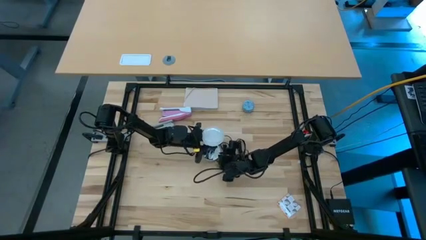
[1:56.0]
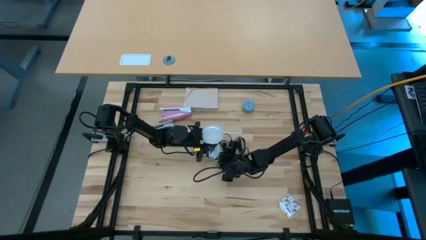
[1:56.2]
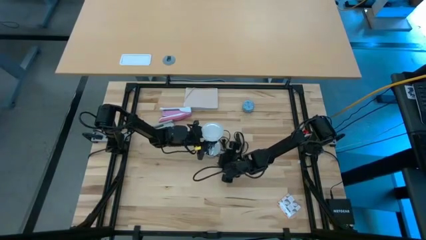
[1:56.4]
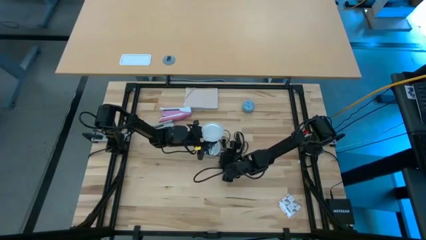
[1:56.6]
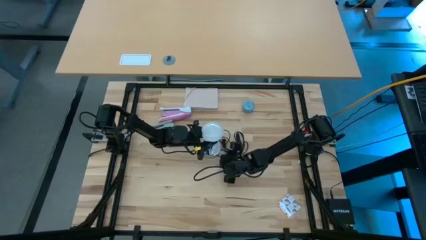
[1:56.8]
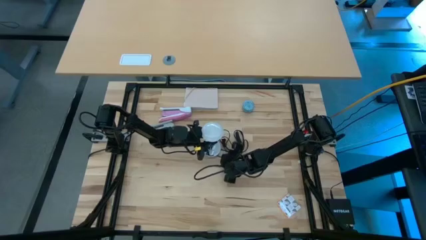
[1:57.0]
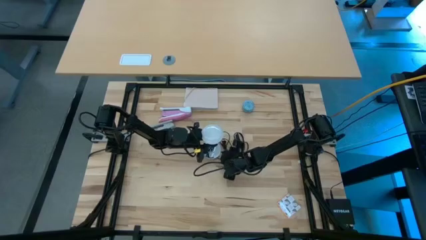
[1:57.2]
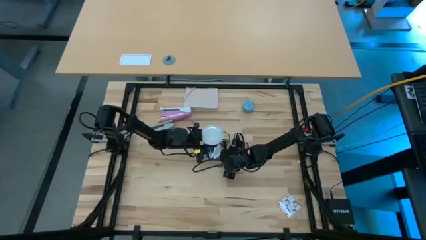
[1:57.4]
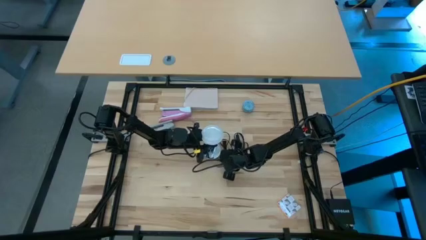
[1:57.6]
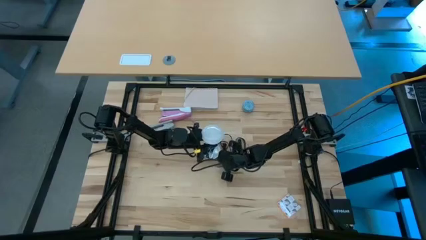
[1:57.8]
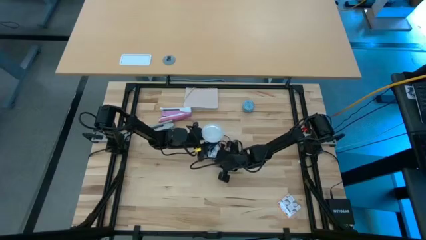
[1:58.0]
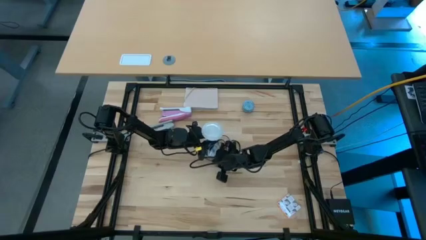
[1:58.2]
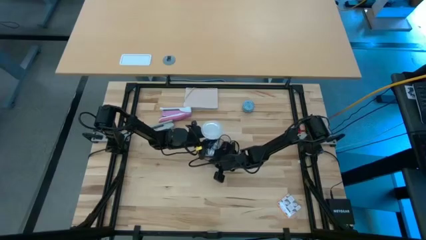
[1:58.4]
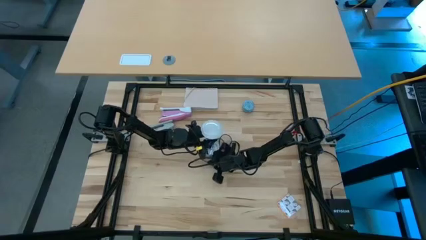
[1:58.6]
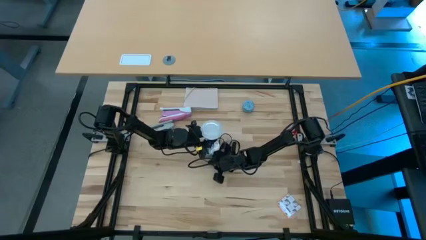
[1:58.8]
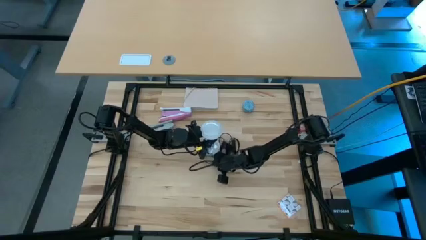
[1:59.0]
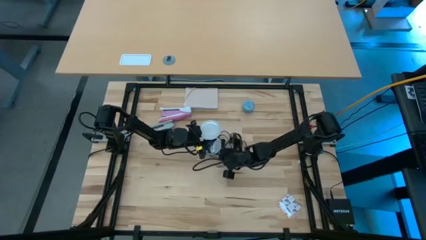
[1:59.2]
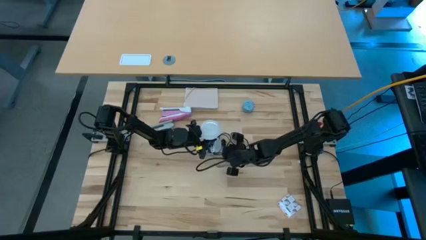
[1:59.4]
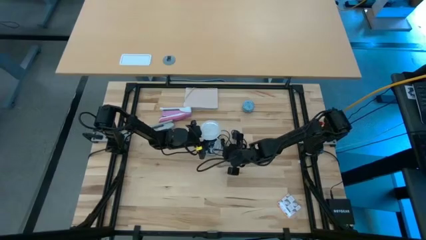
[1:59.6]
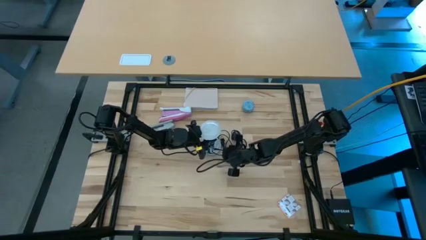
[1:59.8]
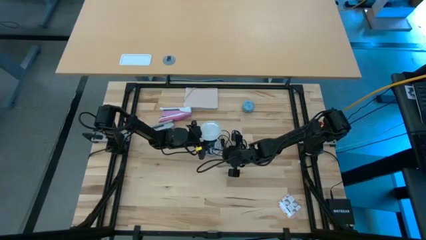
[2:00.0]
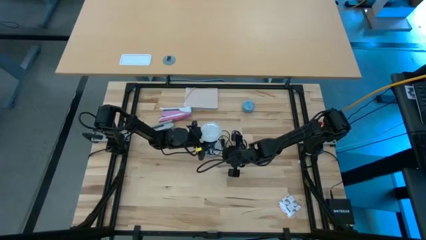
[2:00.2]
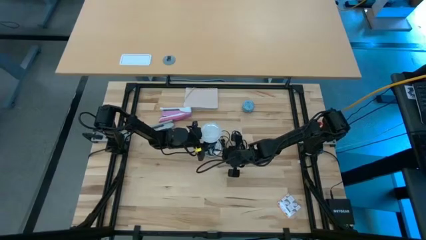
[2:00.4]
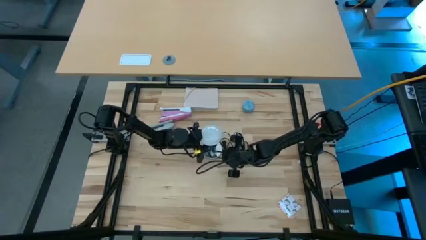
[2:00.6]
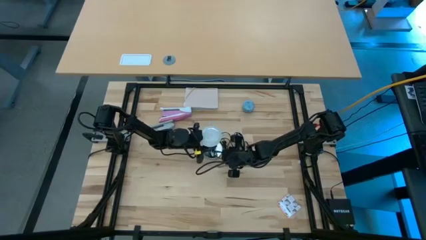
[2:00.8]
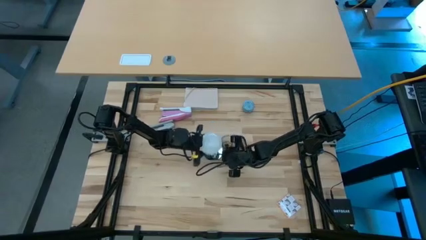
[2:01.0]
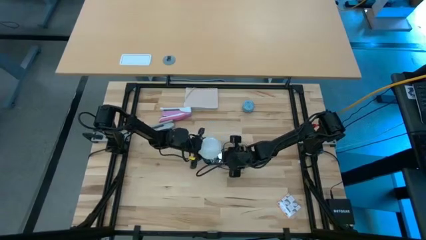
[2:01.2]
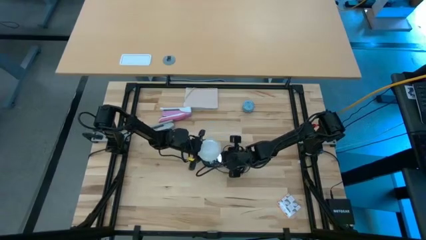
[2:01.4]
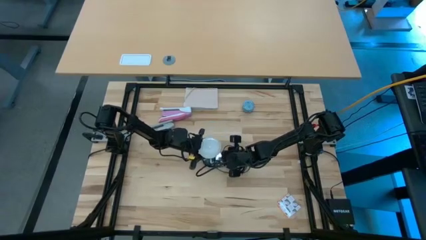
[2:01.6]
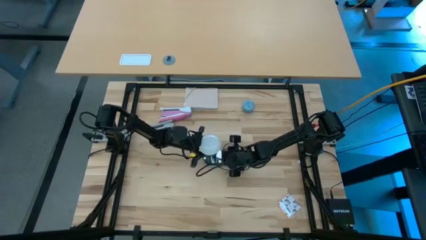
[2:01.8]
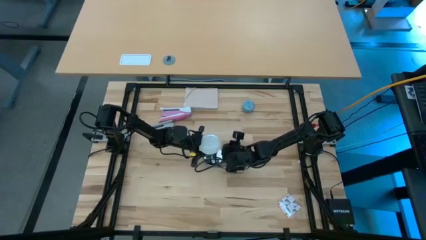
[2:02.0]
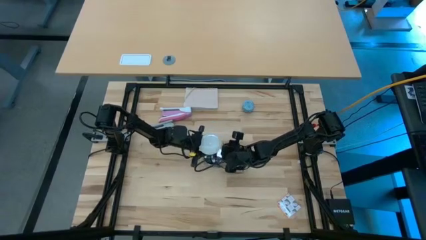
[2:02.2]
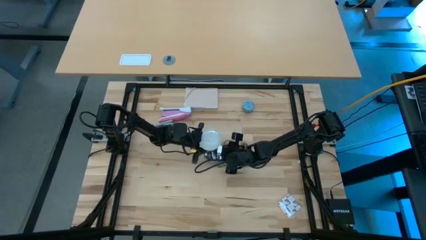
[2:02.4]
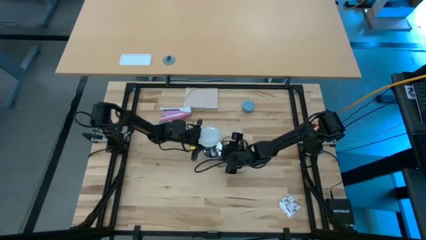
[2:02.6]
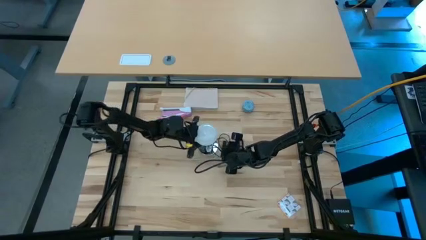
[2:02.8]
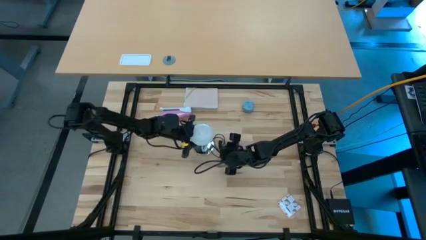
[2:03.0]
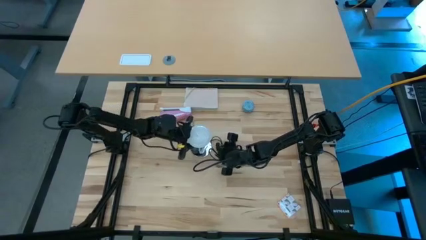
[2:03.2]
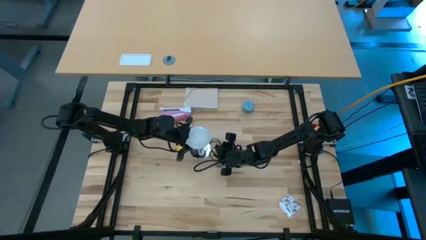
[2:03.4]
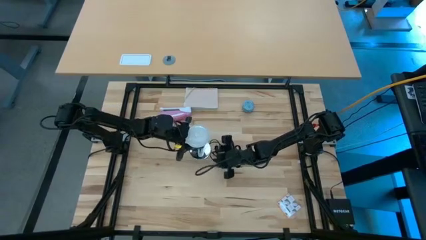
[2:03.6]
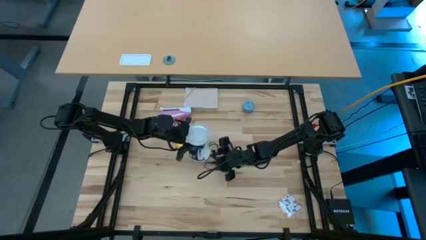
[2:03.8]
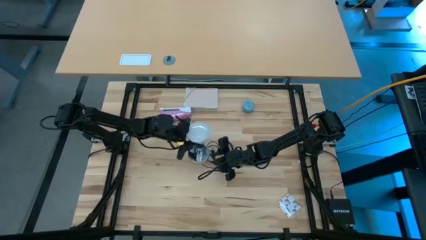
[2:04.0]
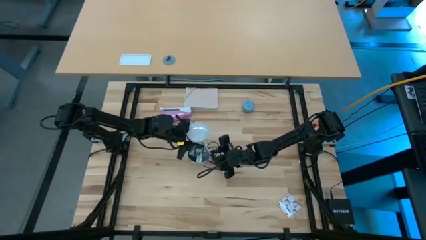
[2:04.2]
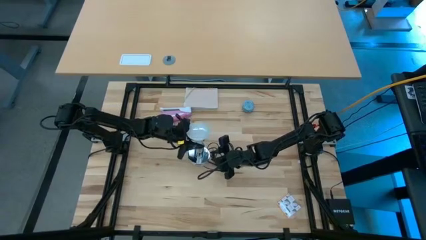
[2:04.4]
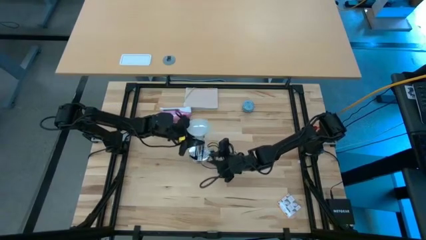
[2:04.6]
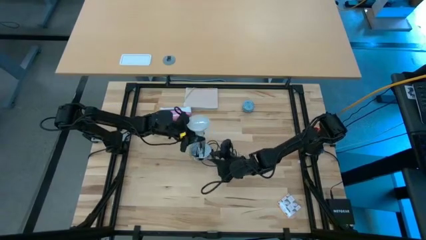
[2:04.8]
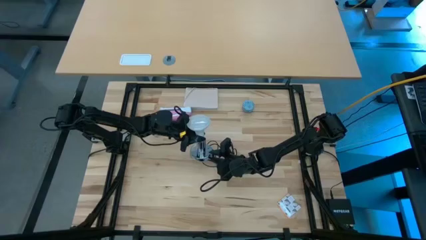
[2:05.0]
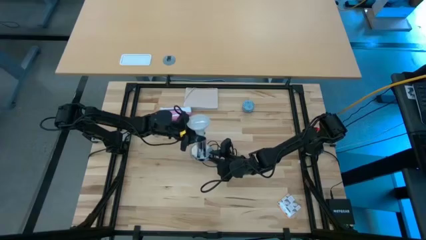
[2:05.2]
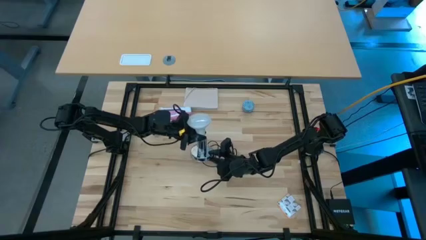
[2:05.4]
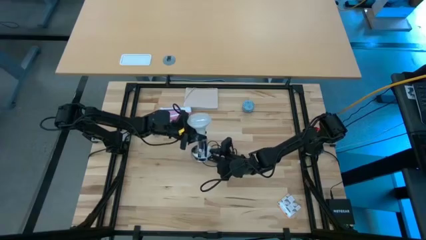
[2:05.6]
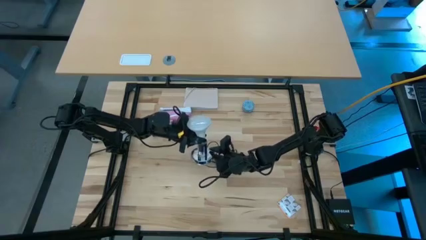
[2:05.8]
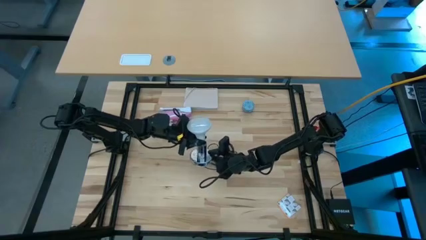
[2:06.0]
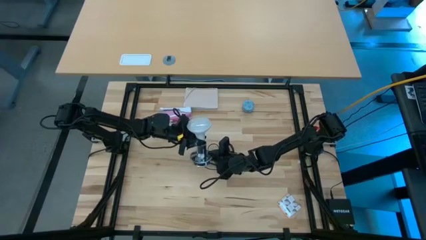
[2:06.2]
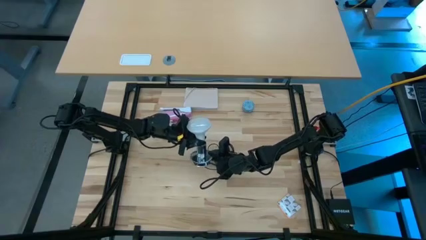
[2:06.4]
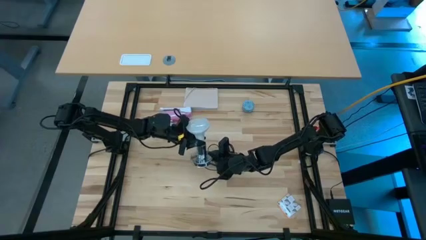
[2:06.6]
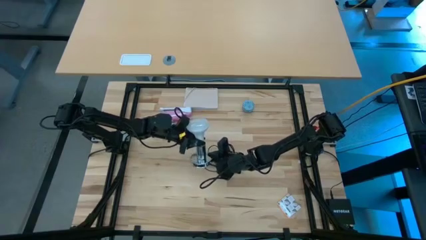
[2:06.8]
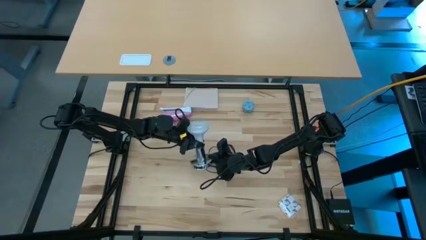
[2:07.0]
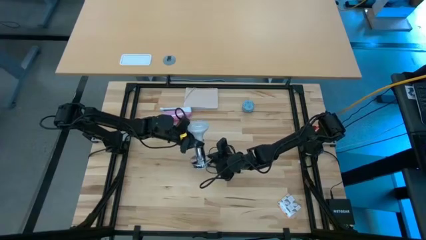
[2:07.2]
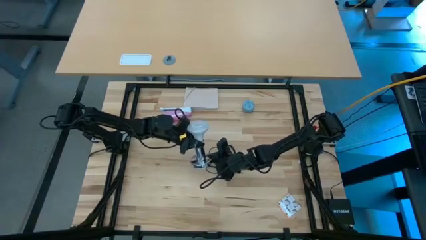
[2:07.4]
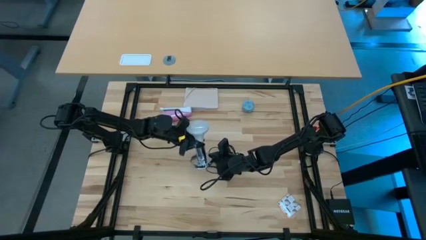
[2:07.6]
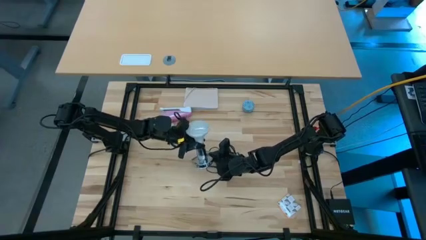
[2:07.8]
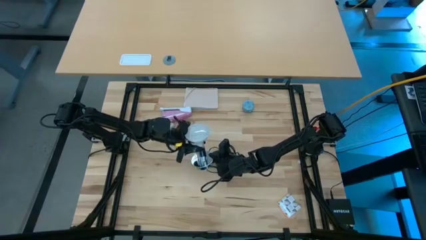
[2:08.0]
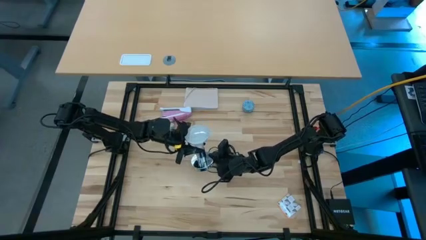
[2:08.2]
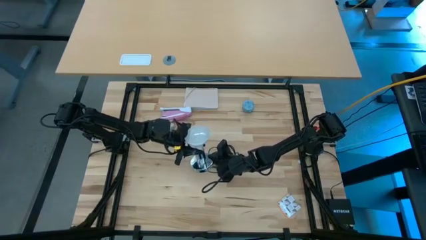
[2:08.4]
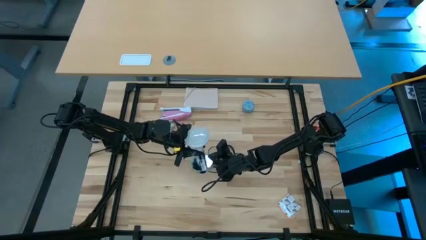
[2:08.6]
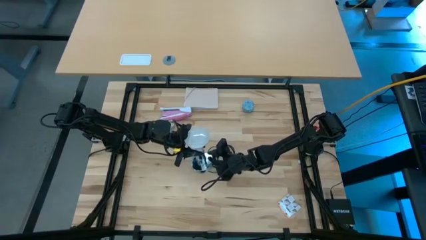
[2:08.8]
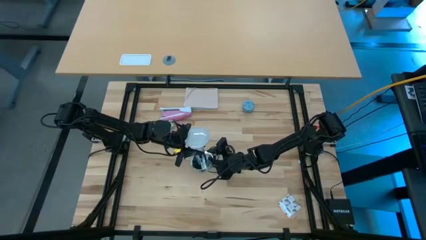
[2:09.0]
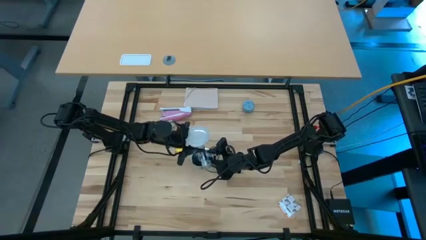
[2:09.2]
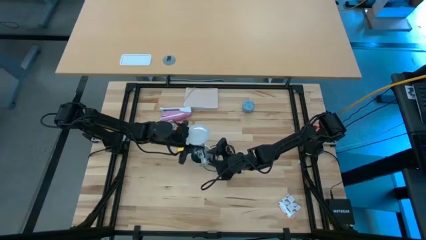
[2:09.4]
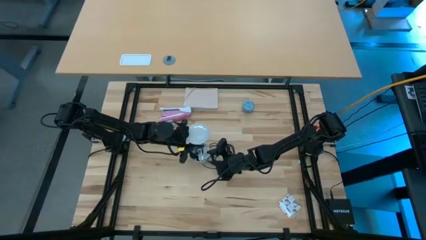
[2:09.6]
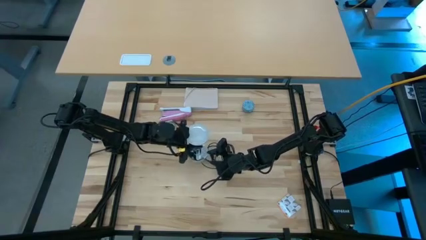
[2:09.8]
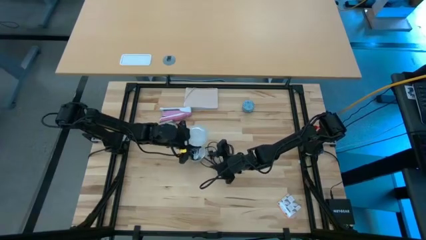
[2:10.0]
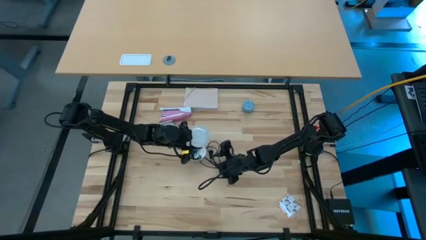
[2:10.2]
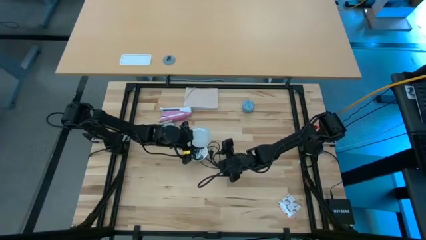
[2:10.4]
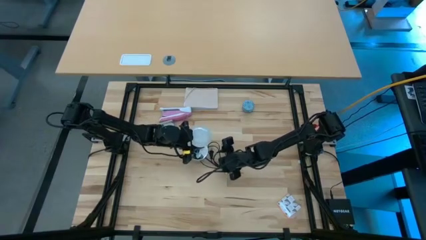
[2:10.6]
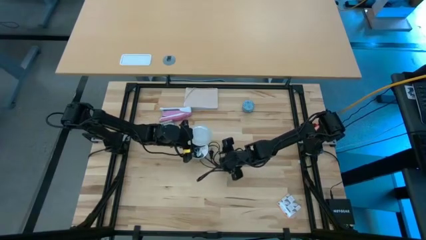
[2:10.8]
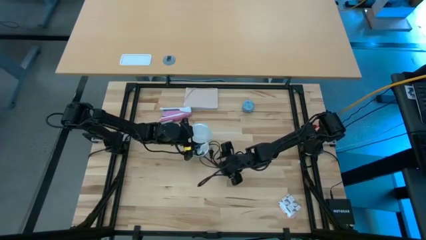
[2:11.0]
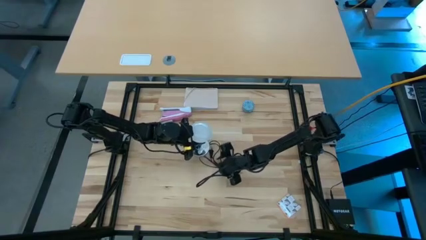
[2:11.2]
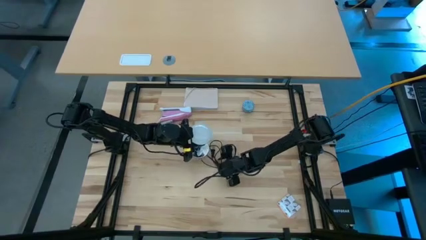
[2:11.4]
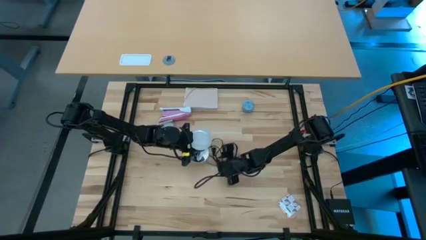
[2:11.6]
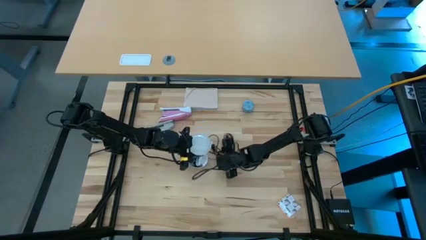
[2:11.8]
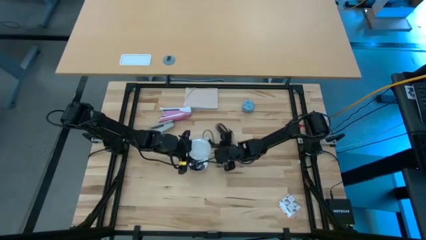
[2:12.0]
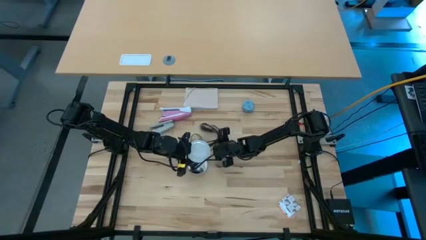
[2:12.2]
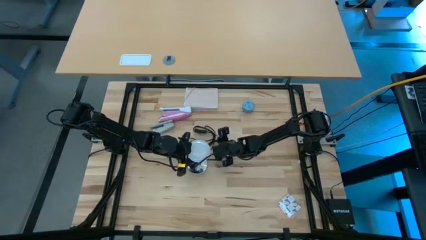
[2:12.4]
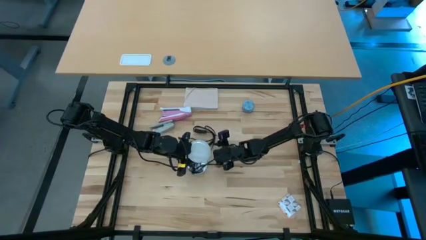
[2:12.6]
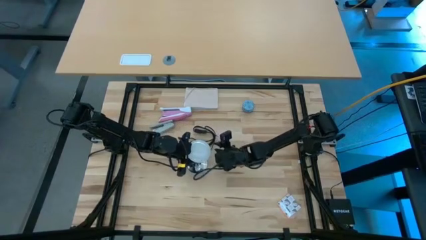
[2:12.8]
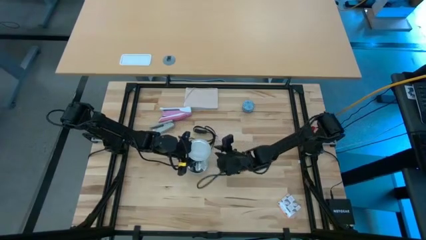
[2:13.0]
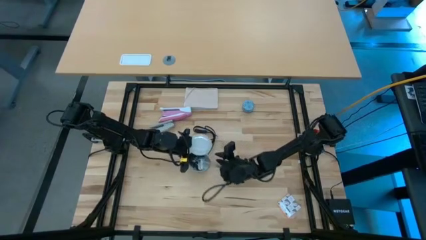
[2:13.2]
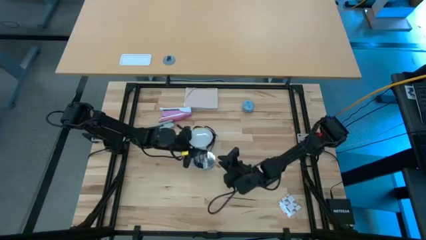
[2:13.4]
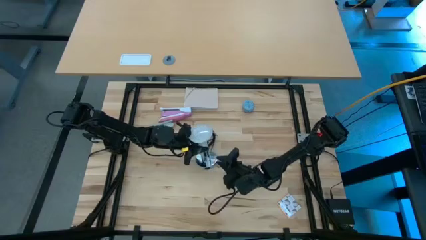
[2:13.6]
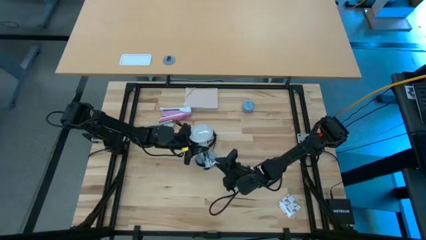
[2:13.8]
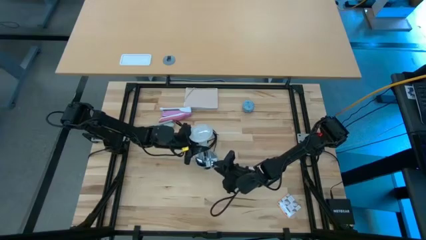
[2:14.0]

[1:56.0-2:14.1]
Task: Screw lightbulb
Insert the white lightbulb into the desk lamp
